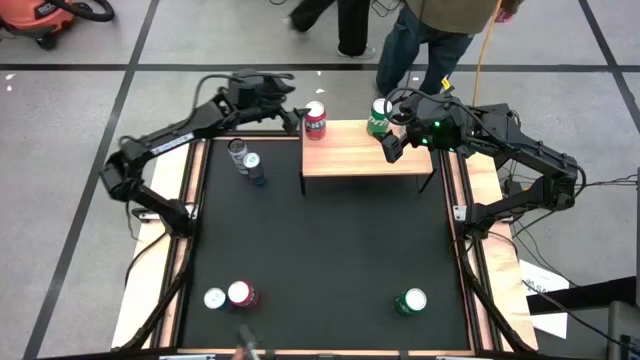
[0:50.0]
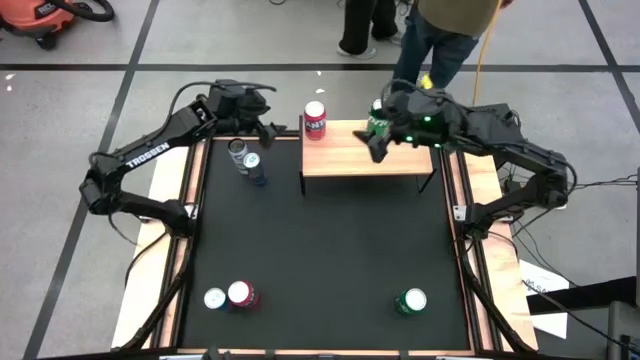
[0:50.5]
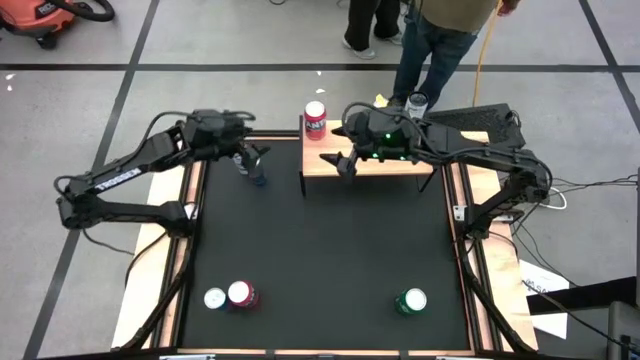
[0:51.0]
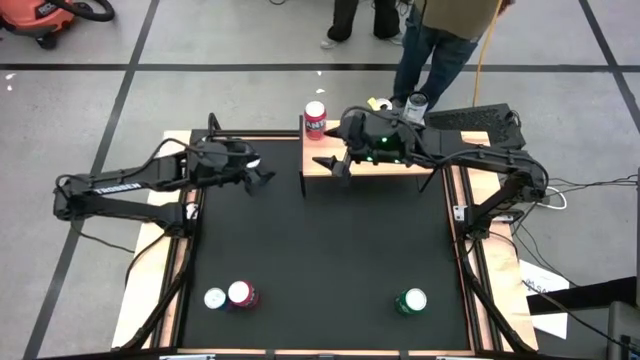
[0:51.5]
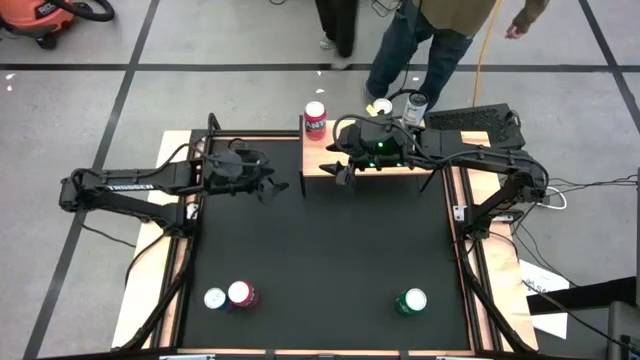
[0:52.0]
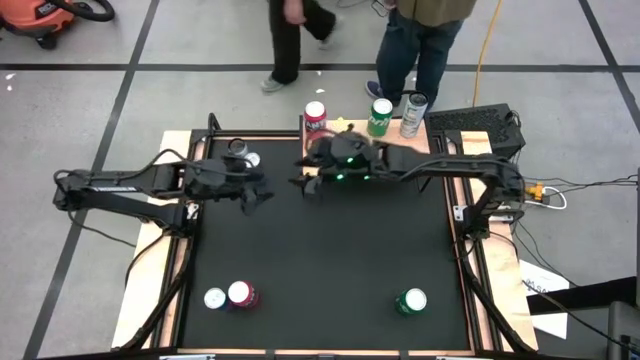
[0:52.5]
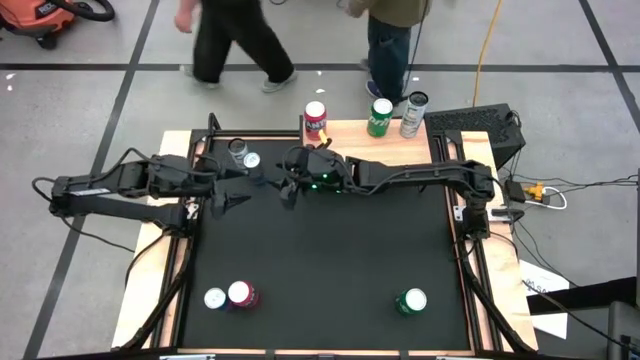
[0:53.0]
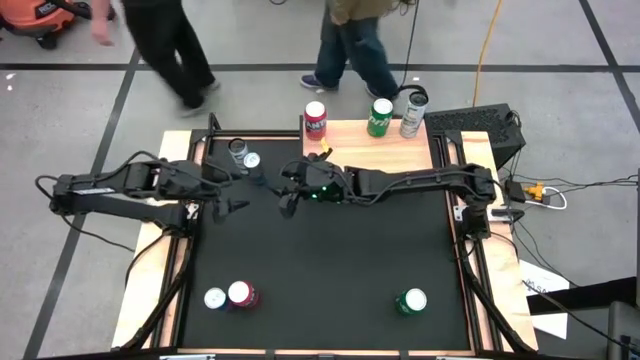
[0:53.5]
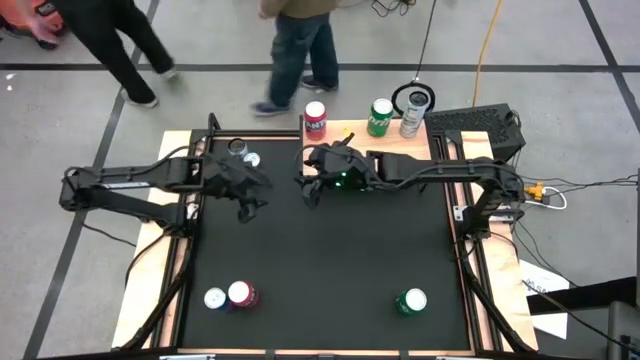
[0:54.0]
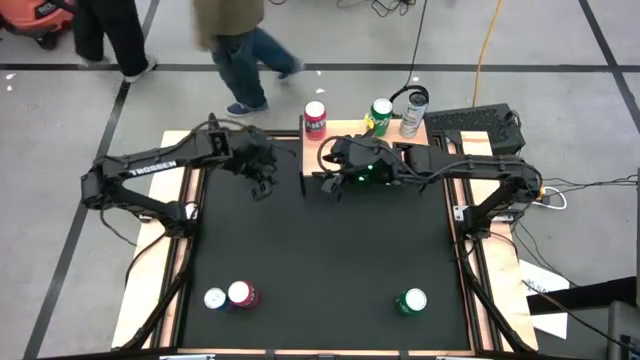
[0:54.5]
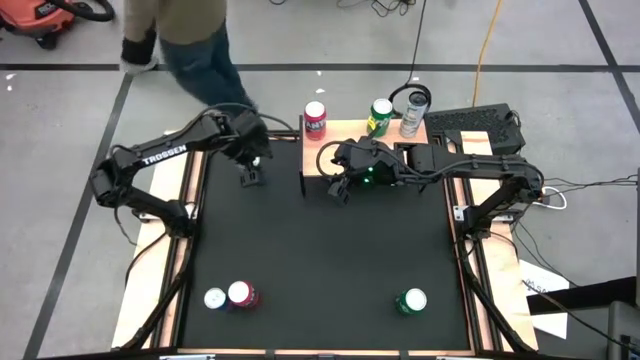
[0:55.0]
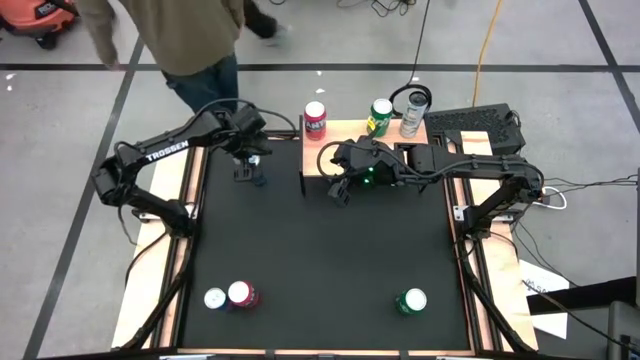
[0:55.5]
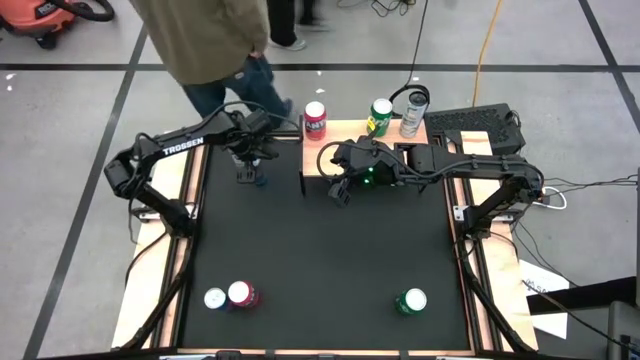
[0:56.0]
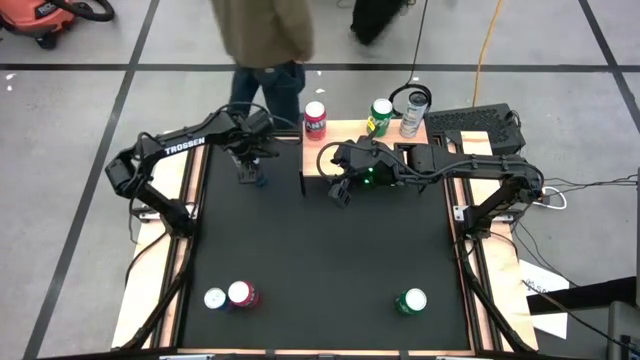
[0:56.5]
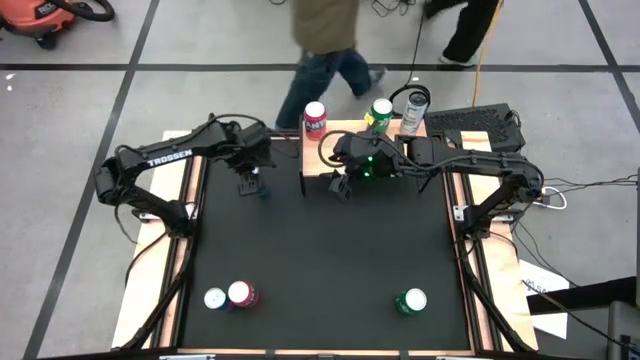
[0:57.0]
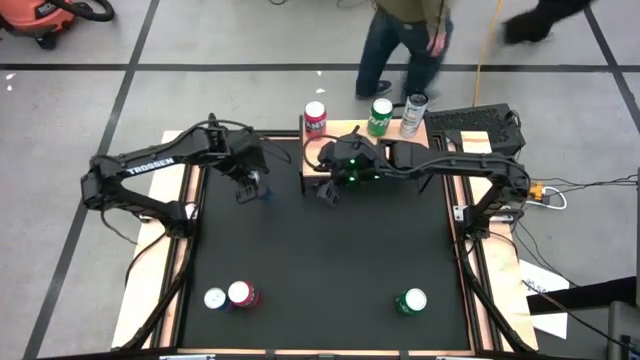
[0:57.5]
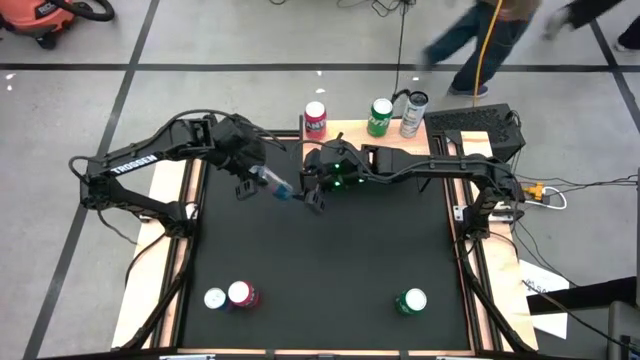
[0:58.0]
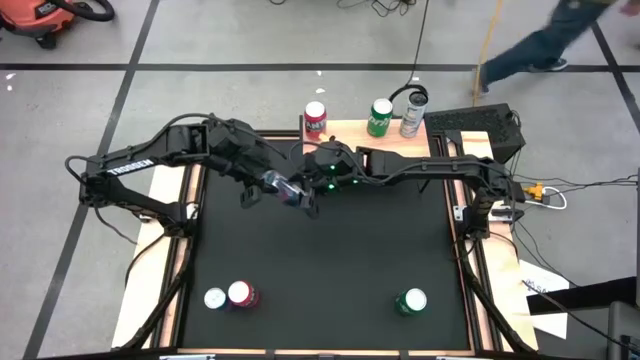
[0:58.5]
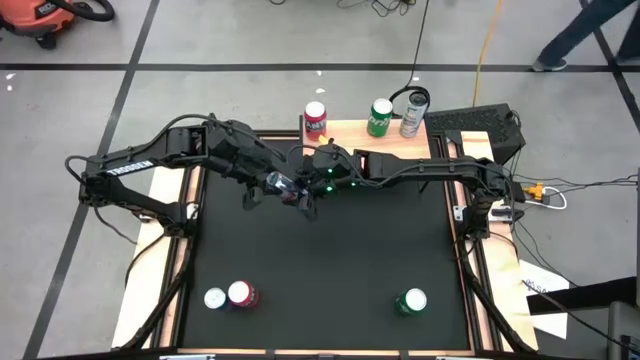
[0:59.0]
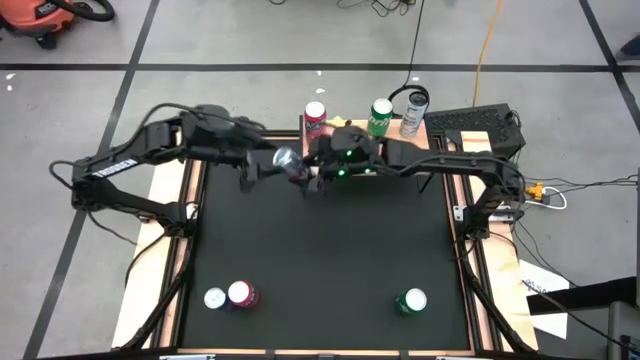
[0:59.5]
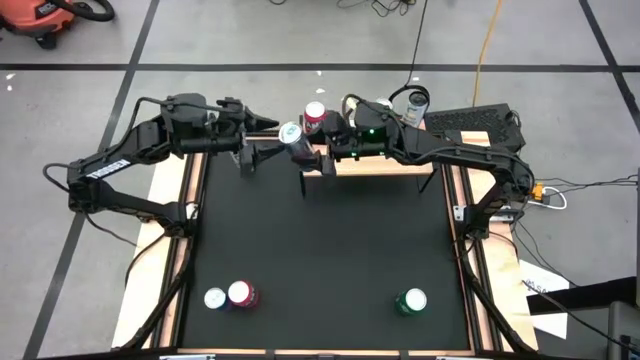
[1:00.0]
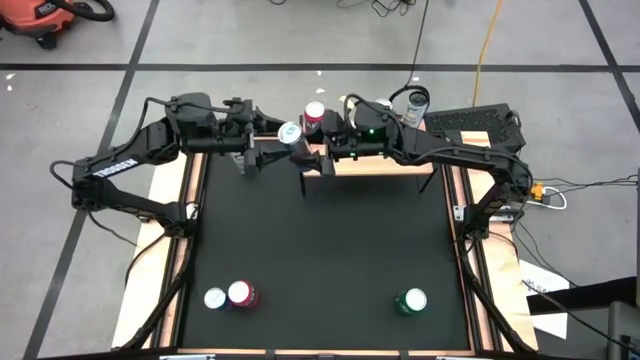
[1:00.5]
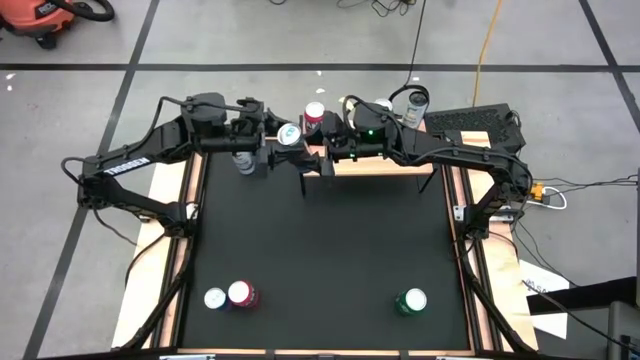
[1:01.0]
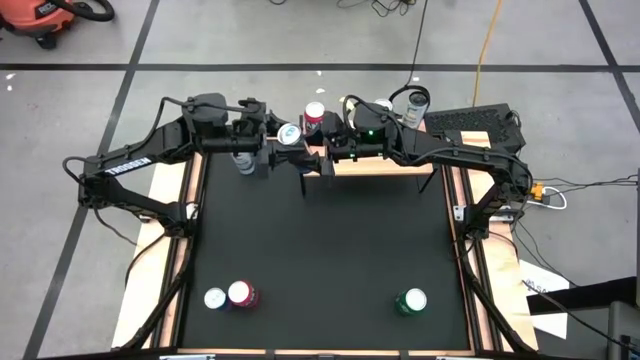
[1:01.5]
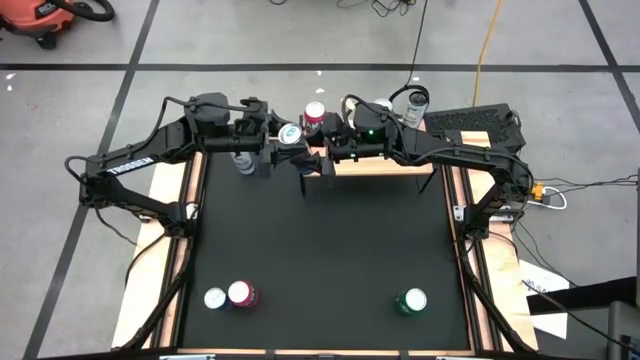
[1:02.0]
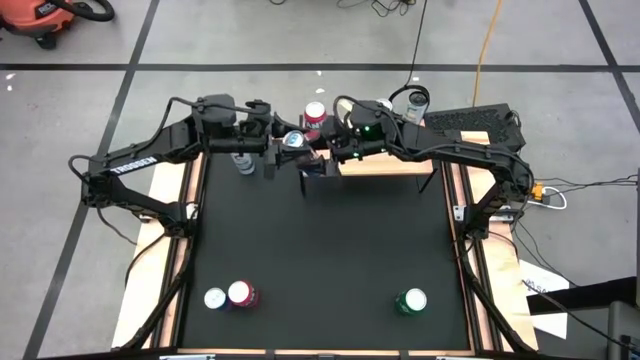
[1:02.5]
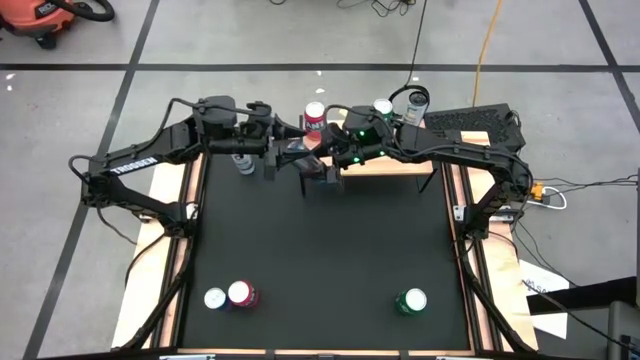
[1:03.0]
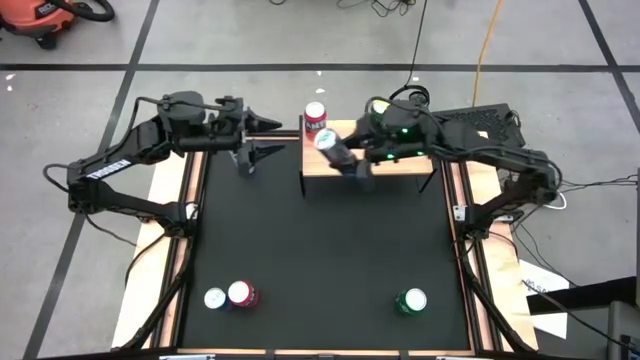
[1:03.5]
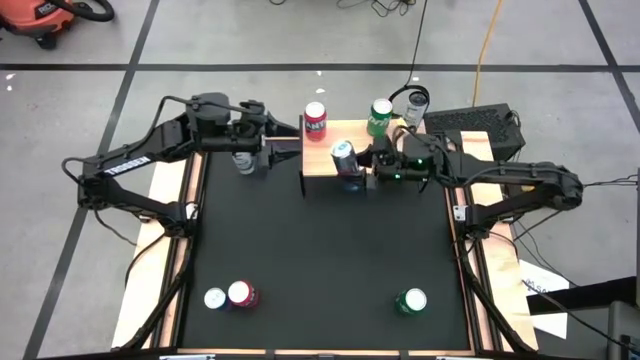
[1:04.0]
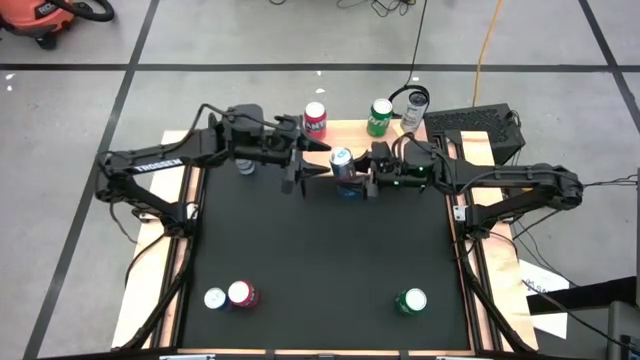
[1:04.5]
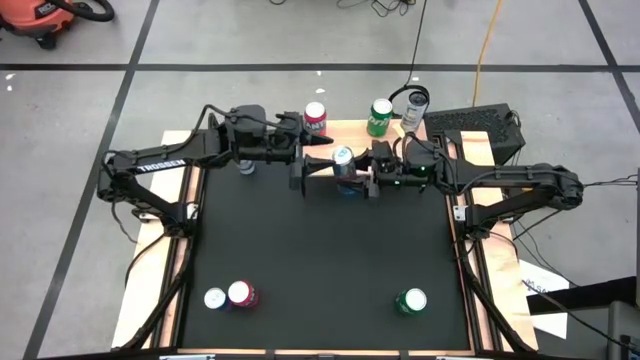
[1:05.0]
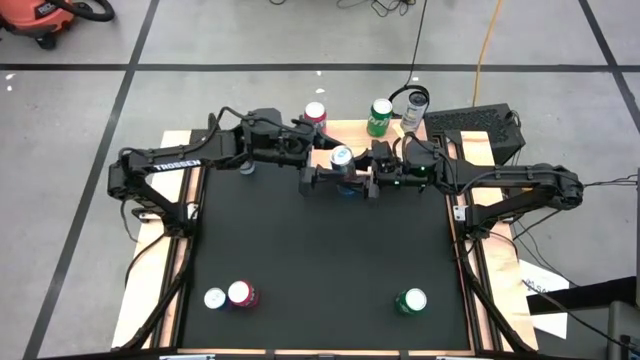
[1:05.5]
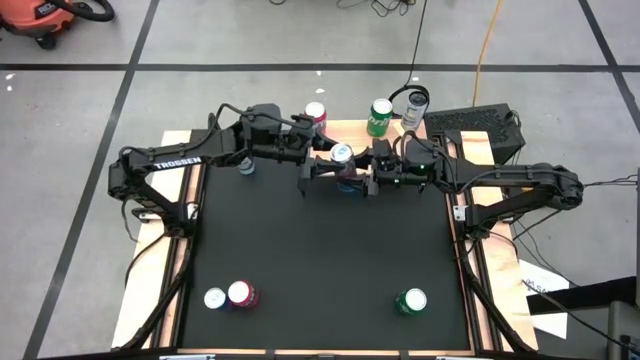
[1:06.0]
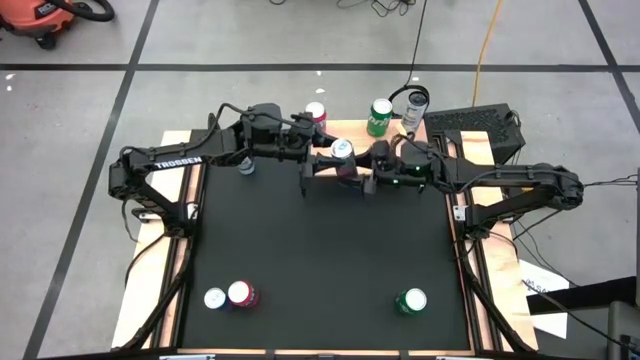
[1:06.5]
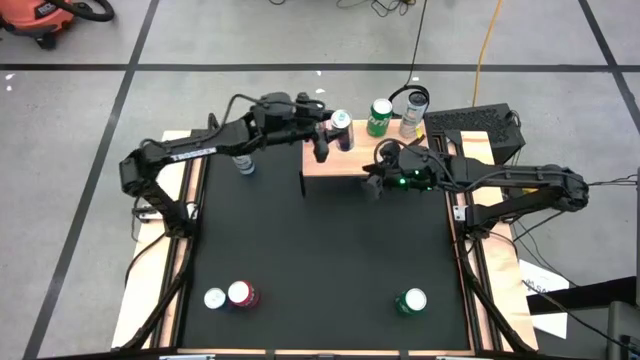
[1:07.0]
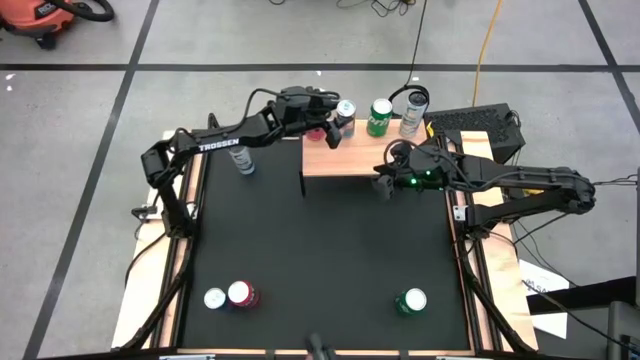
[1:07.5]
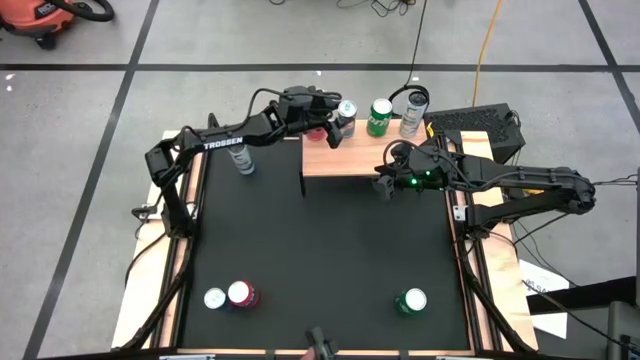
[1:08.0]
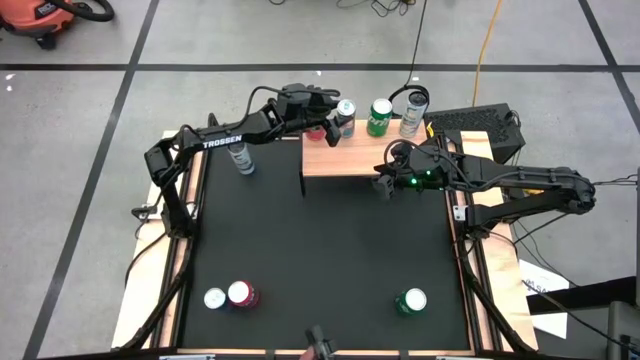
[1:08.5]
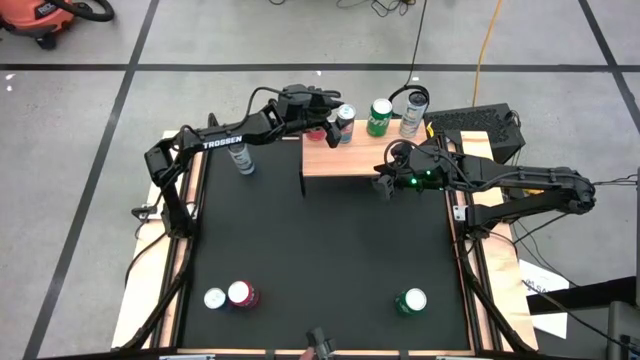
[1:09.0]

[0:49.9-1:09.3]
Task: Place canned beverage on shelf
Put the top blue soda can on the shelf

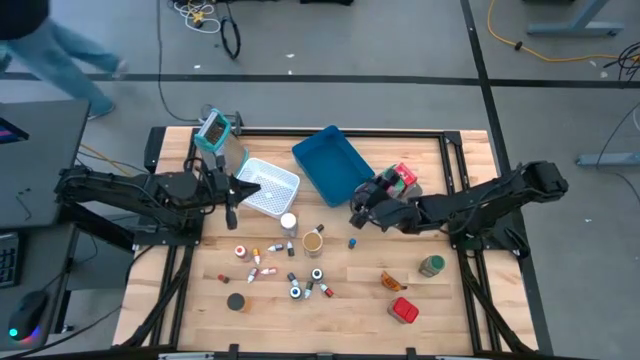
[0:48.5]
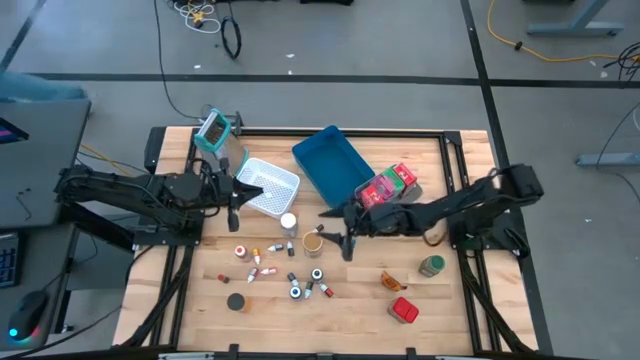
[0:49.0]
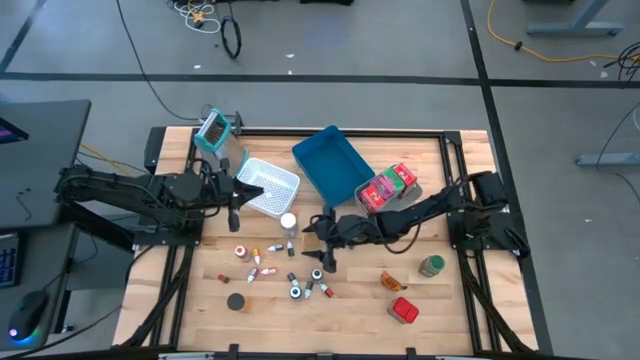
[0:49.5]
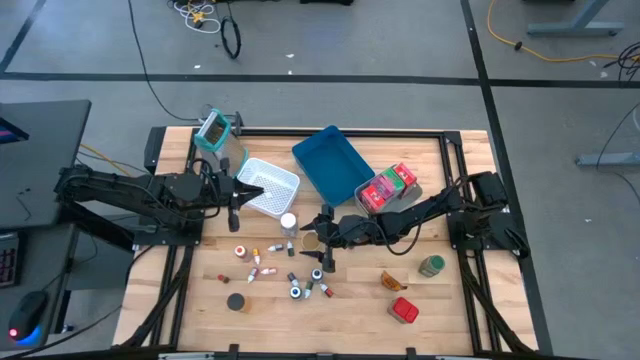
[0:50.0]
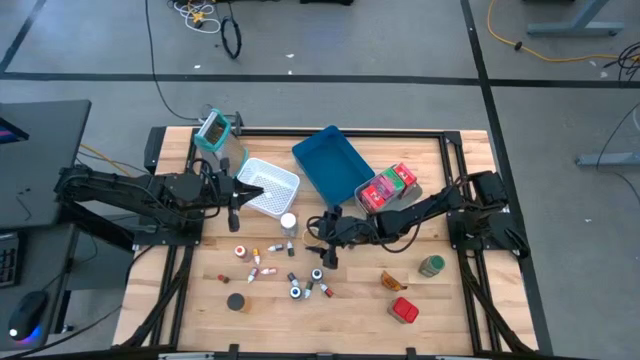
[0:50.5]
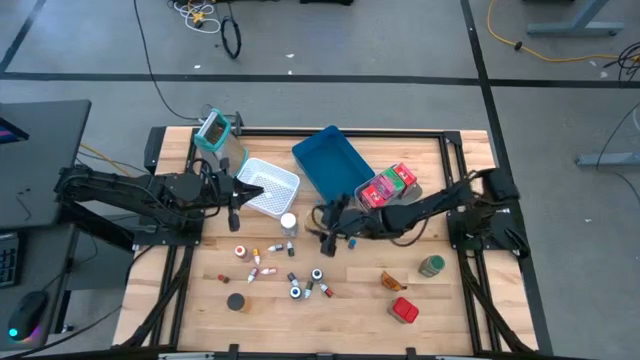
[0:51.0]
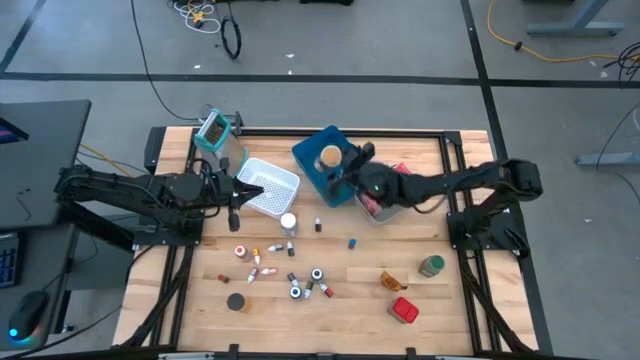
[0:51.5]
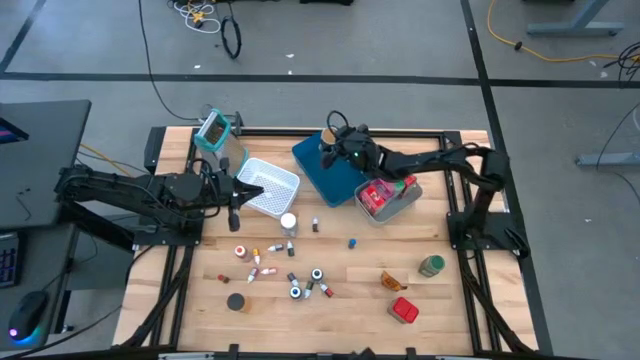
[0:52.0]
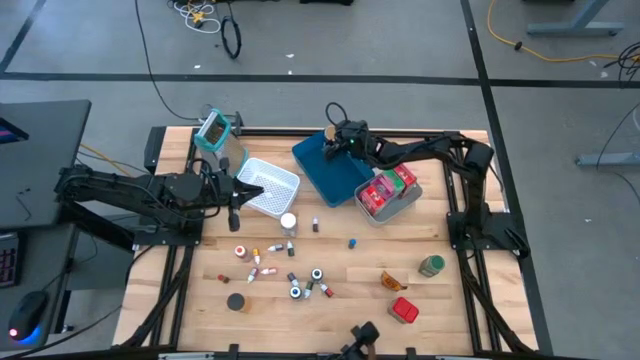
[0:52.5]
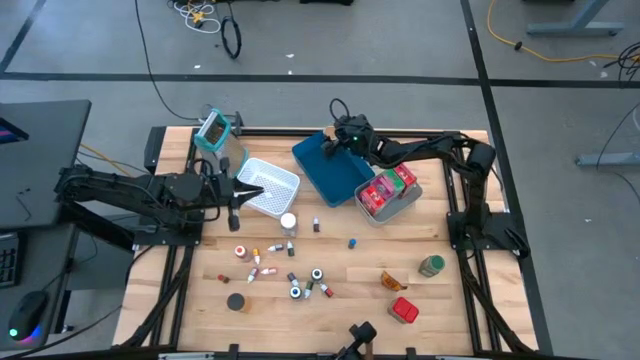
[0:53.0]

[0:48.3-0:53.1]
Task: Pick & Place Kitchen Items
Put the gold seasoning bottle into the blue bin
